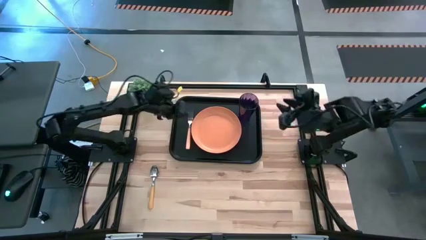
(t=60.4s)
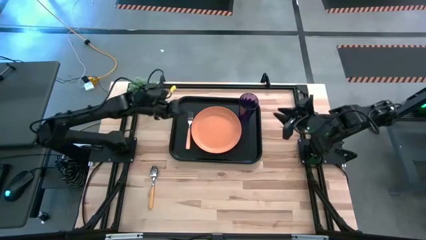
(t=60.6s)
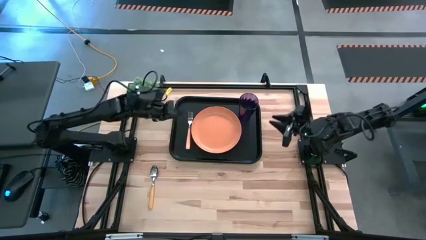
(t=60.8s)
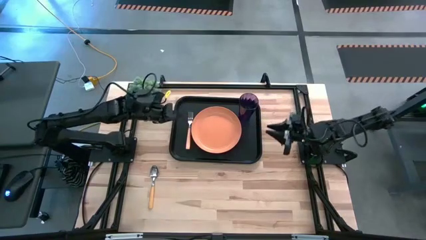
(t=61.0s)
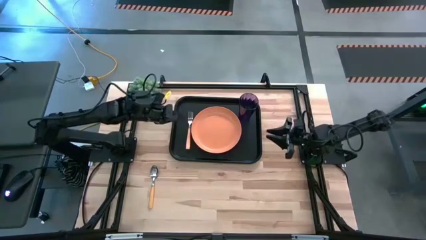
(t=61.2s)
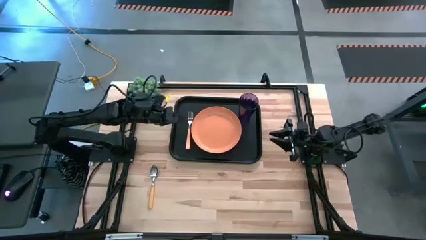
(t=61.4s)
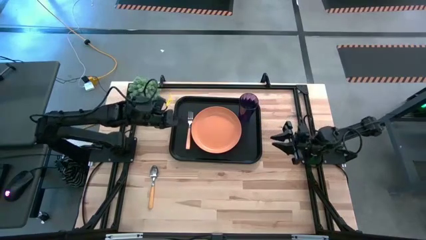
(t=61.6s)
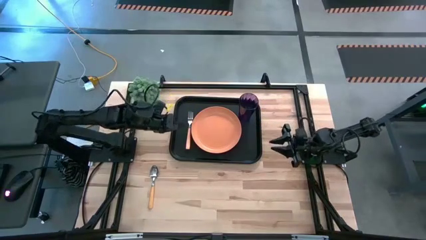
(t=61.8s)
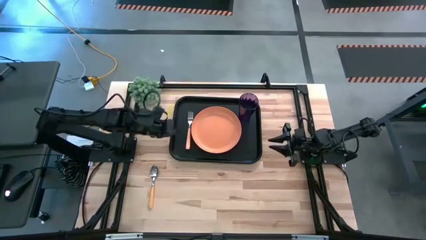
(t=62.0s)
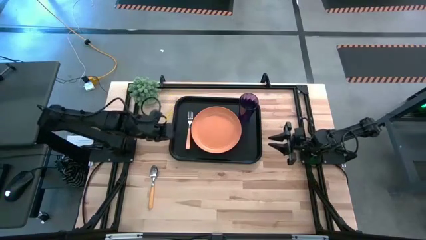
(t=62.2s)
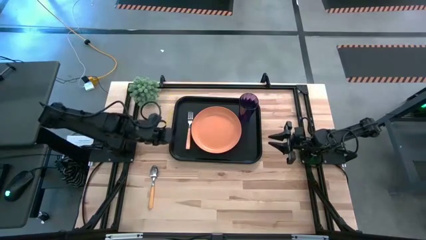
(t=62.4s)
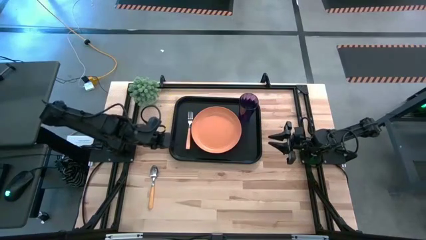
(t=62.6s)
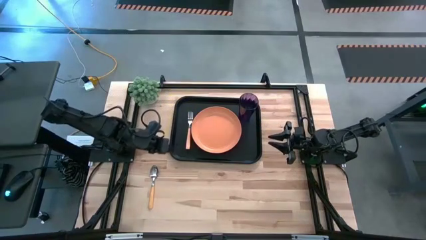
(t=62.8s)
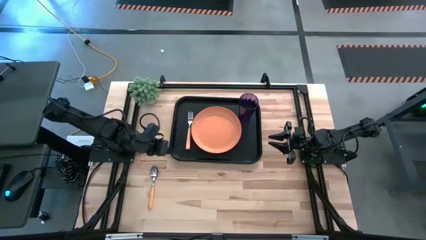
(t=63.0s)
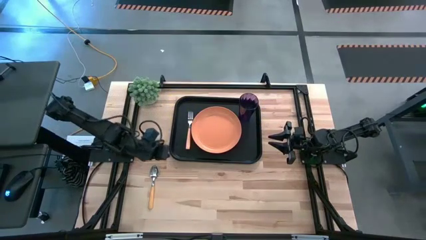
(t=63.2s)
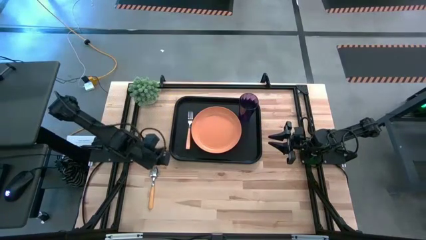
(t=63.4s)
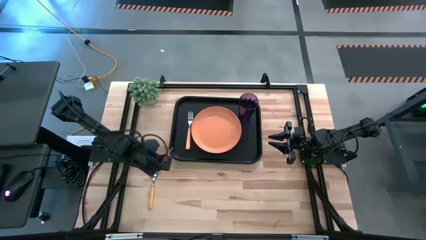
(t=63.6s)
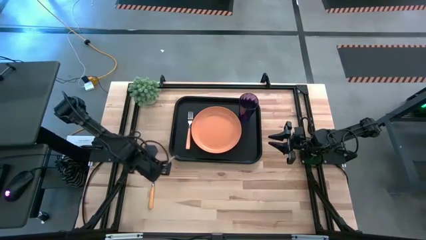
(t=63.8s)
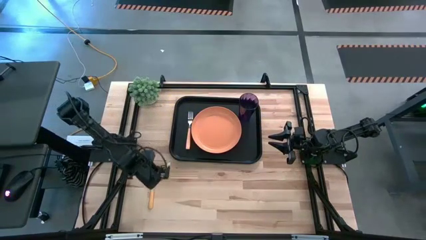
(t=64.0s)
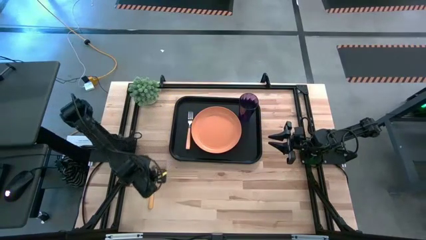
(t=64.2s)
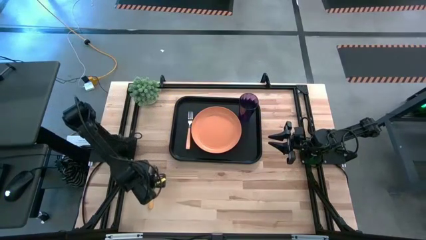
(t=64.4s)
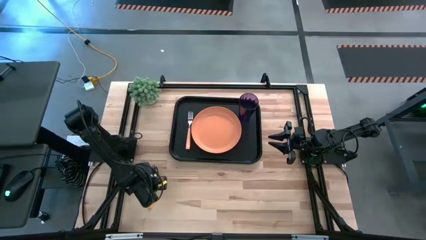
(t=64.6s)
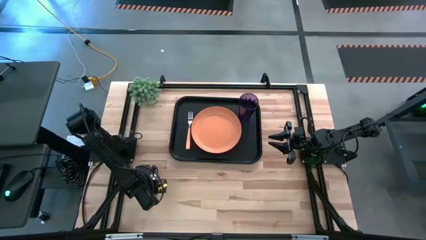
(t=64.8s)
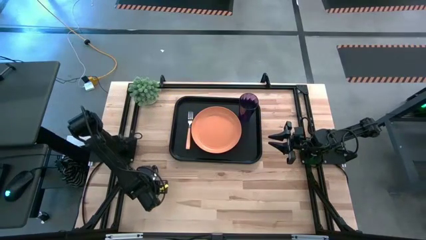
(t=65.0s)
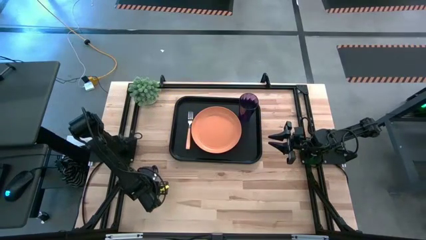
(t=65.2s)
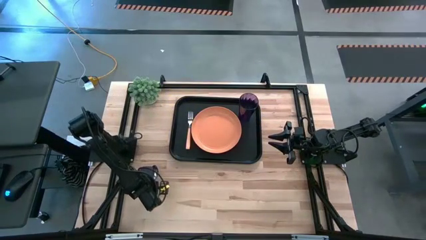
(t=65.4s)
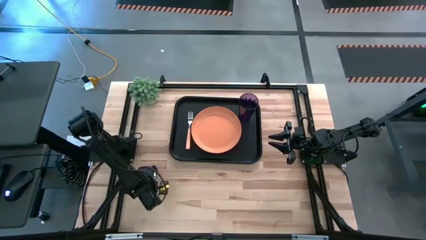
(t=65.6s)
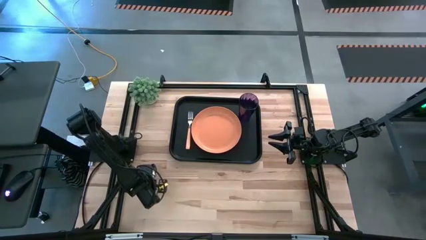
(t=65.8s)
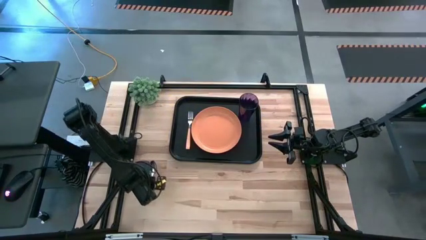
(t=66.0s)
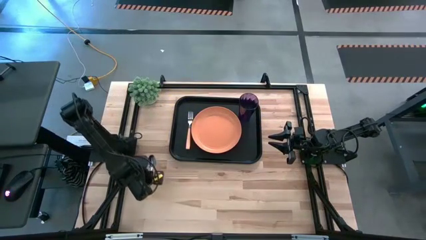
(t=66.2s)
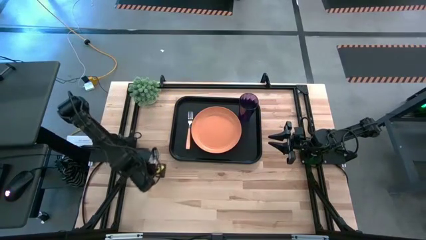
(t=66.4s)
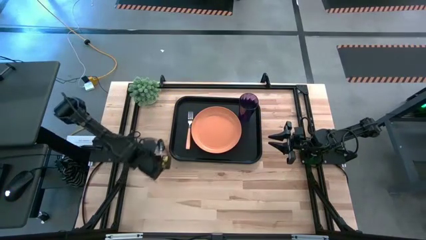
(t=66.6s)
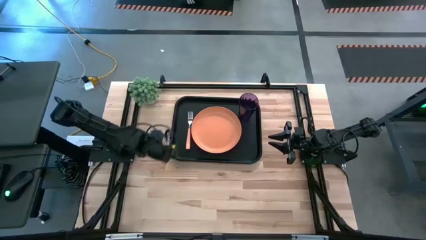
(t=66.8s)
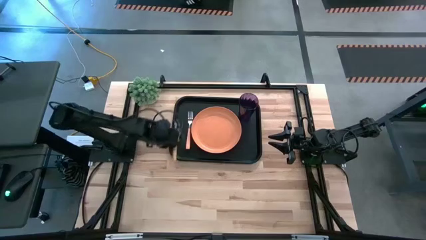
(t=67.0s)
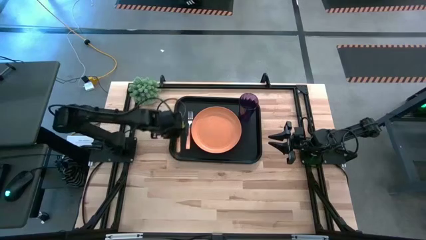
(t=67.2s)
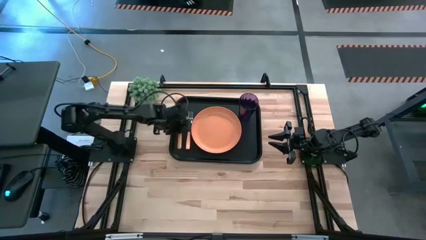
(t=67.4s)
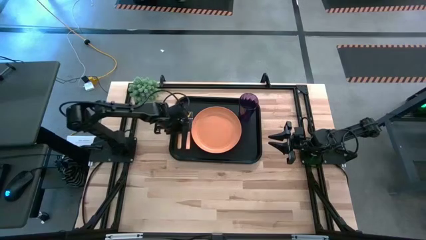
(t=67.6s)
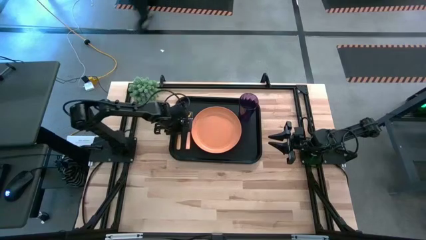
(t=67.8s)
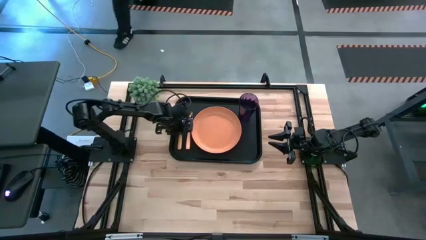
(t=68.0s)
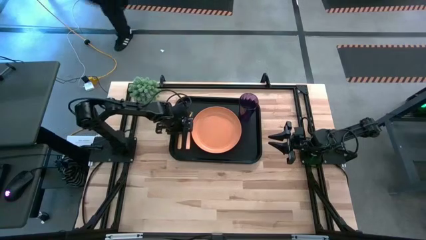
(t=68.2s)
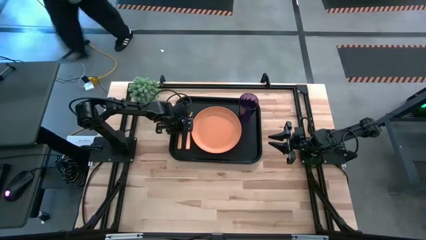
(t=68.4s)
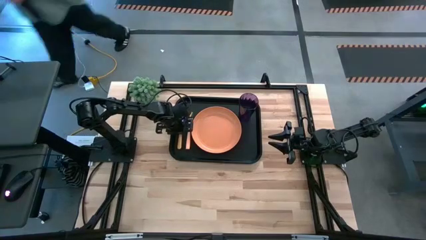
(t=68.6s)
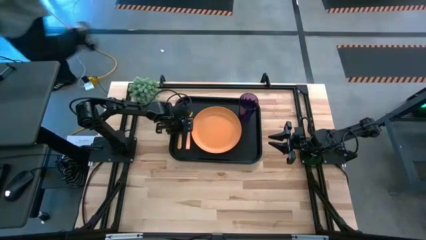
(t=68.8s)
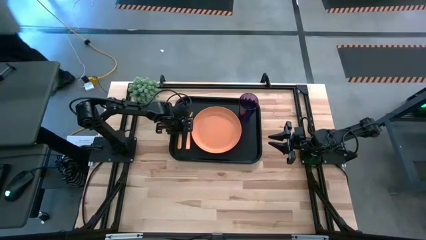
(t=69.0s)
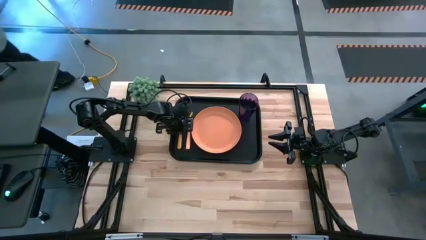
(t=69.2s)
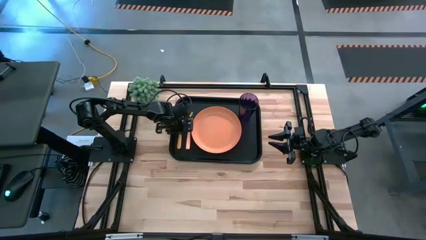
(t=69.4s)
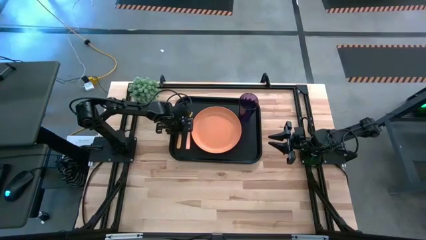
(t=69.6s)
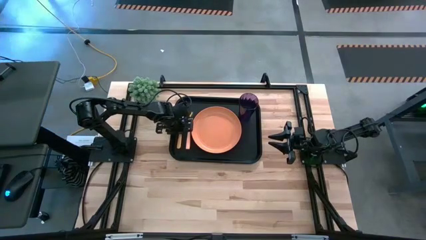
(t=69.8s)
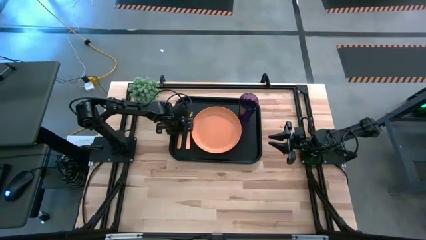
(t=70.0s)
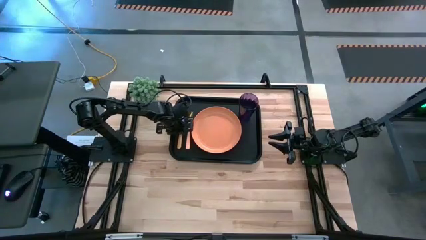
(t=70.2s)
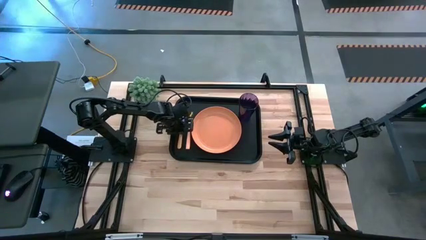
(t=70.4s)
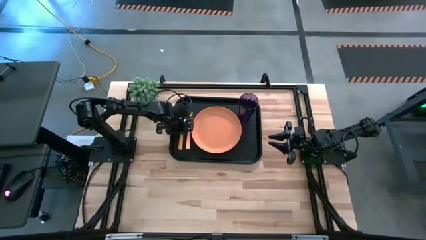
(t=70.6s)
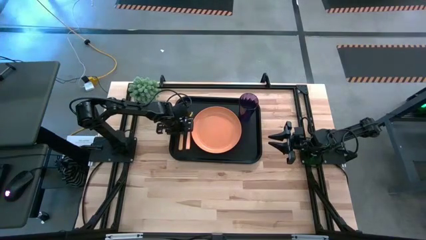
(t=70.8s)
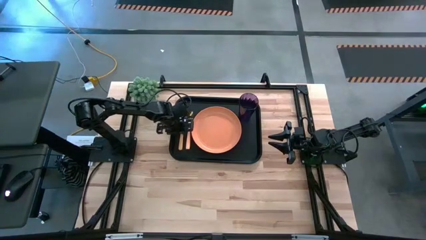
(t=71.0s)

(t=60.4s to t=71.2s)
Task: Pick and place plate/cup/fork/spoon on tray
Put the orange spoon on the black tray beside the orange fork

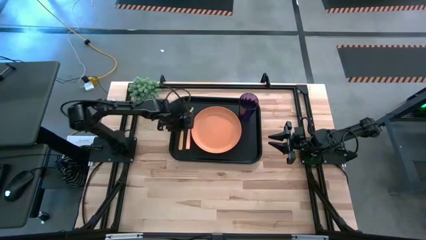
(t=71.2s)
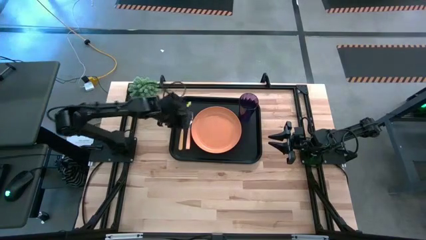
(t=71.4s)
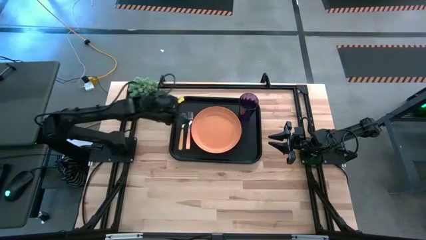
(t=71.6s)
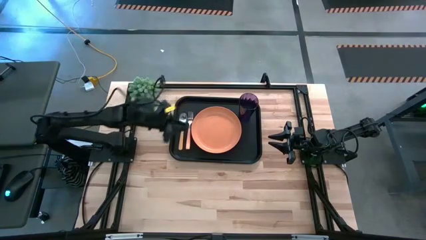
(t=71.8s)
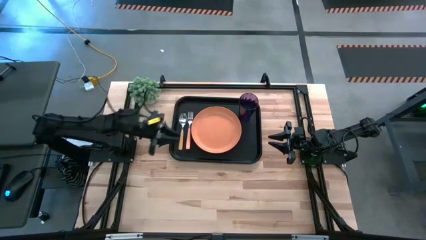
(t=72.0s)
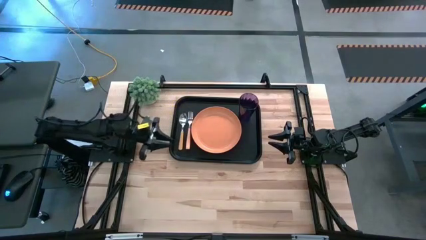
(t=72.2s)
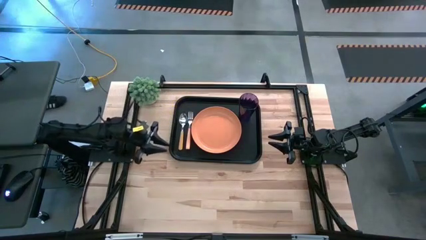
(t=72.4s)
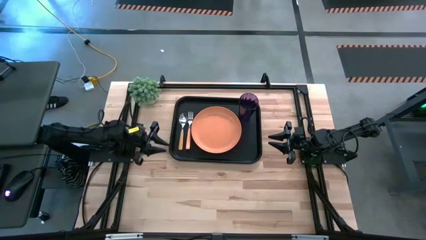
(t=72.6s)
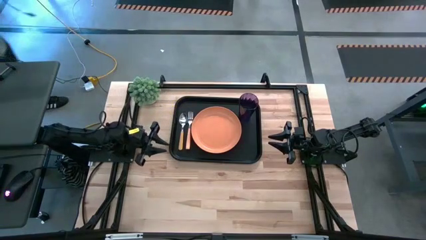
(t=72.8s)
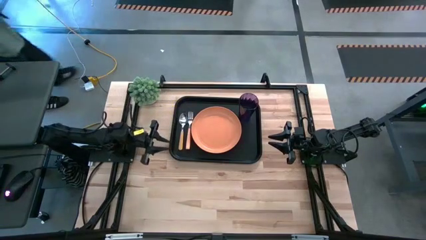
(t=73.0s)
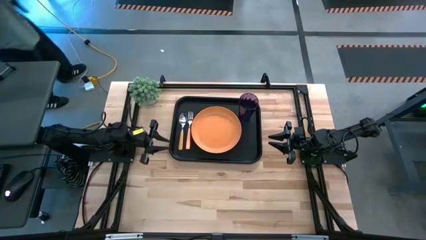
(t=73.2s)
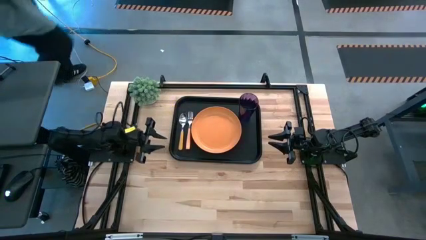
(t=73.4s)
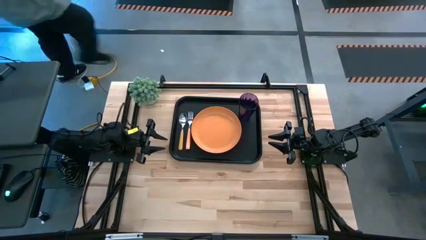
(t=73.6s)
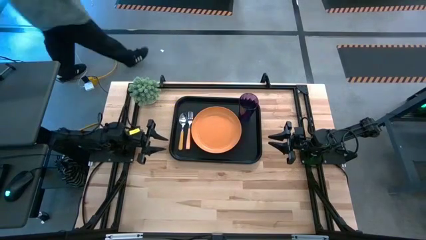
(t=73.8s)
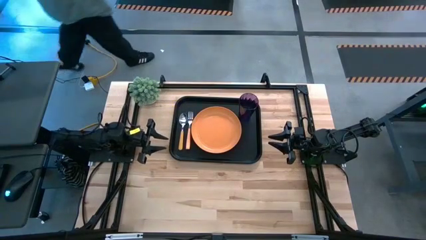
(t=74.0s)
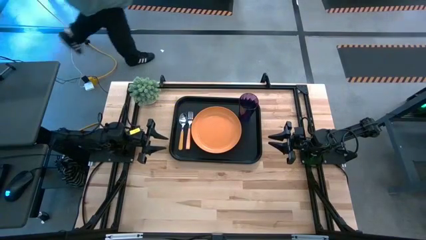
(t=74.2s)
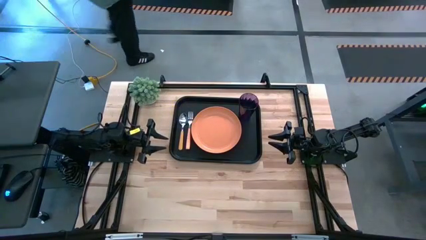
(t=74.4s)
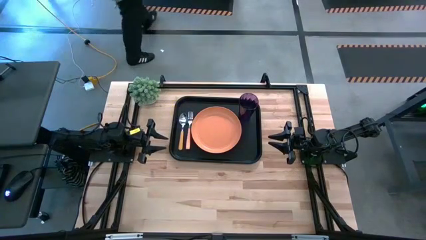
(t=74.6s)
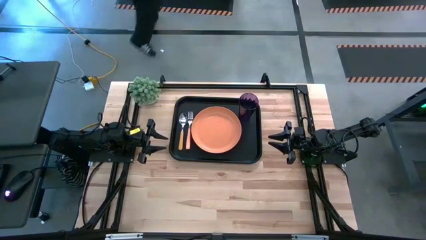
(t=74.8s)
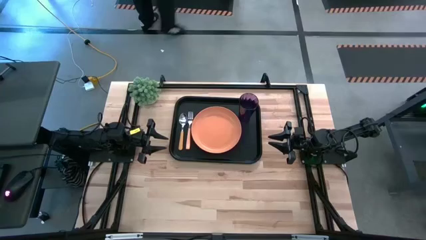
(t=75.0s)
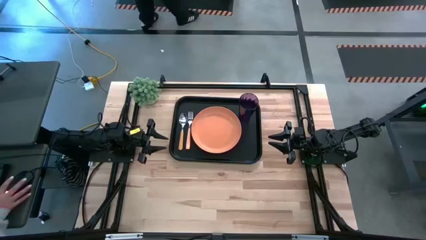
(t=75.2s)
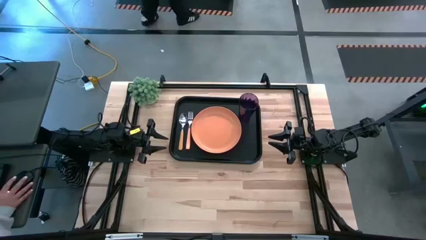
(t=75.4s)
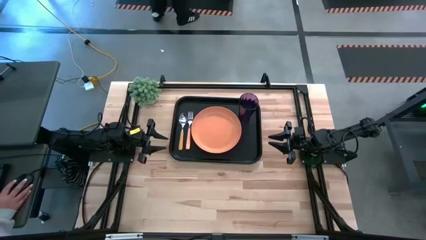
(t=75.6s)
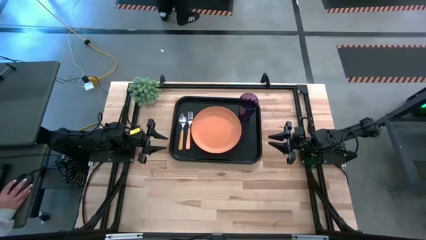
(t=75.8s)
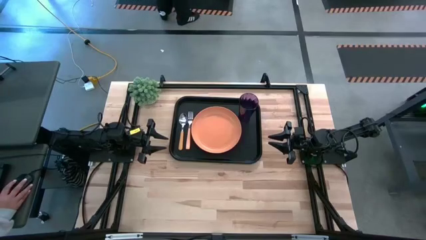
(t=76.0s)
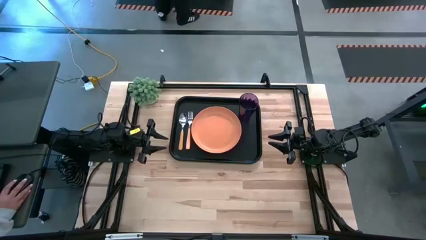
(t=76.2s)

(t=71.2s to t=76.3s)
Return to Home Position

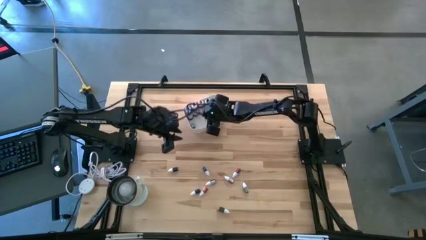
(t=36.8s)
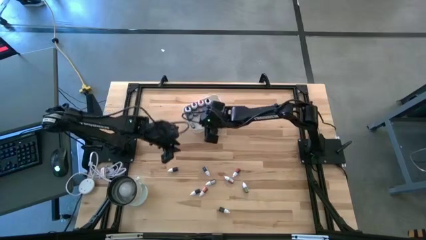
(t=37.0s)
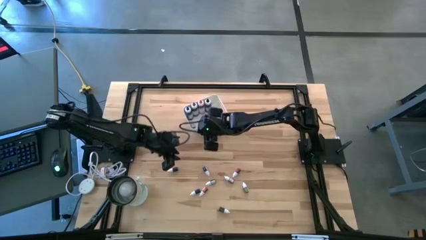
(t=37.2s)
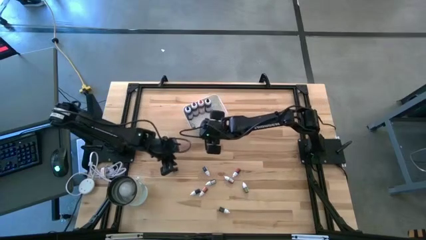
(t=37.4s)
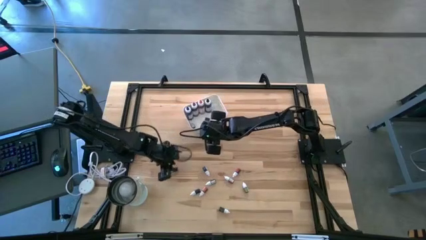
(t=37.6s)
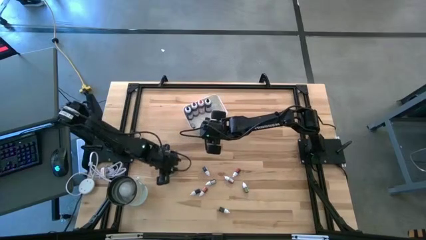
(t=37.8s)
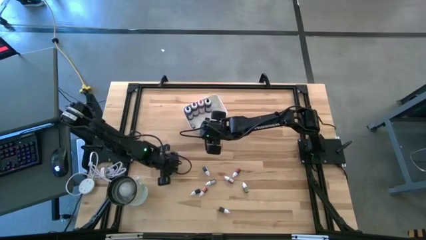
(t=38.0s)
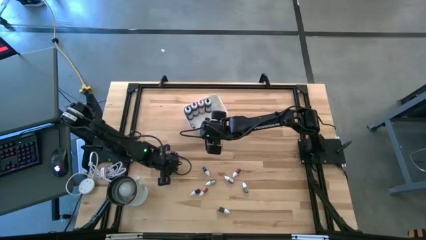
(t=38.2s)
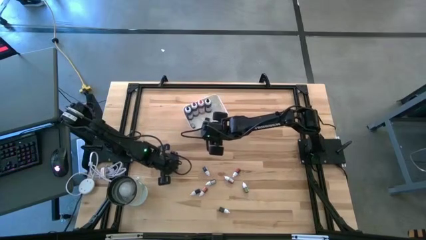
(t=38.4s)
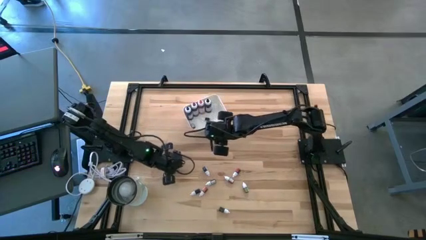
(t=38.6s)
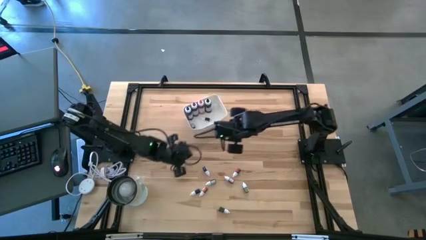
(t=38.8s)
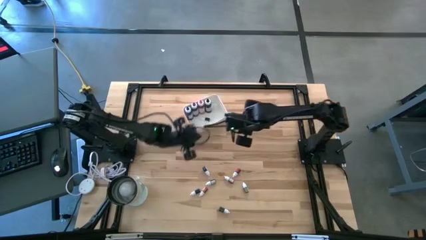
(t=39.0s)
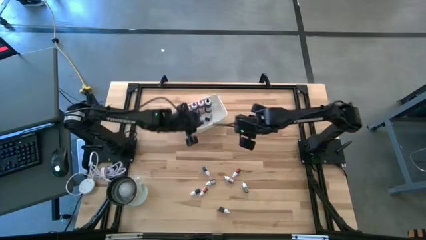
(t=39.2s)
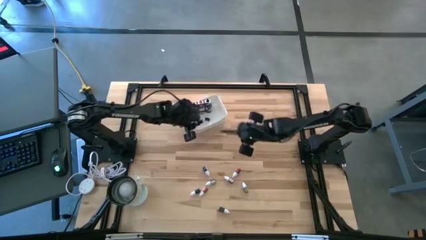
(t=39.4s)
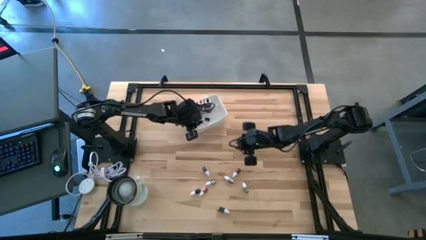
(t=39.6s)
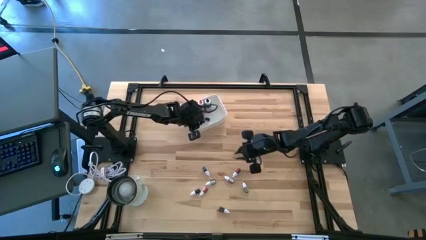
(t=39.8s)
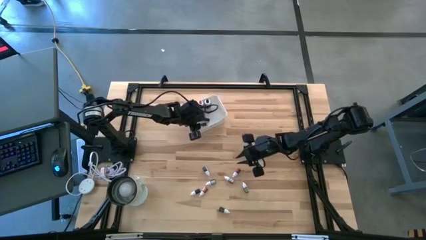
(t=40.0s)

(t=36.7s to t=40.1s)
Task: Pick & Place food coloring
Put the small black food coloring bottle into the white bin
